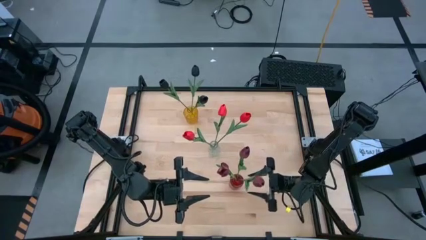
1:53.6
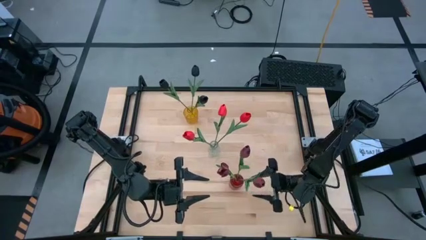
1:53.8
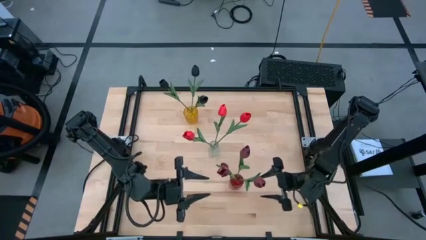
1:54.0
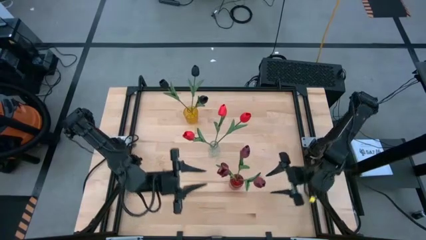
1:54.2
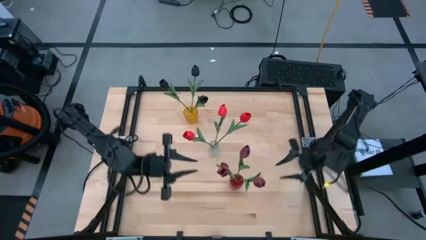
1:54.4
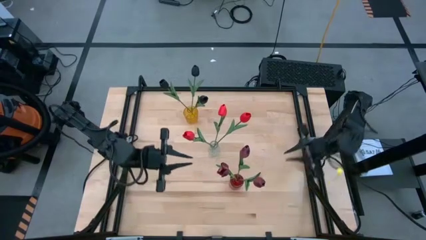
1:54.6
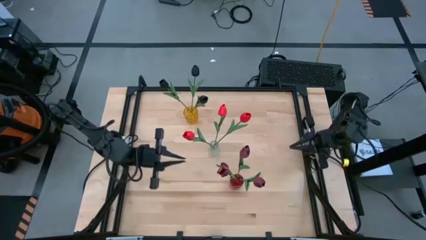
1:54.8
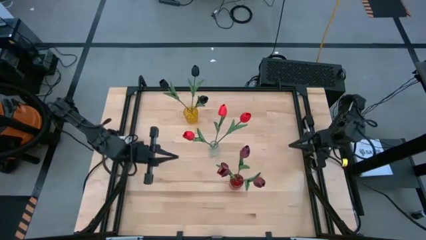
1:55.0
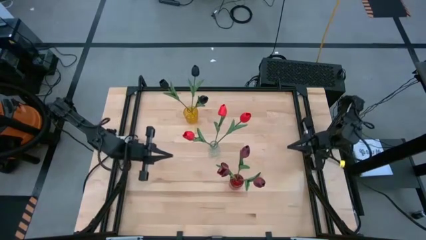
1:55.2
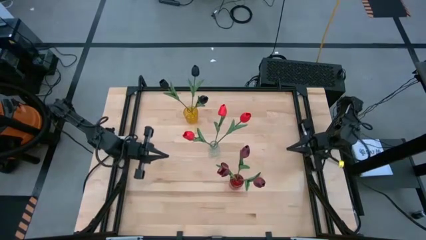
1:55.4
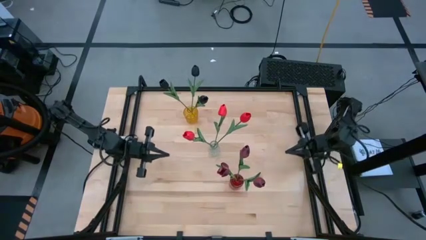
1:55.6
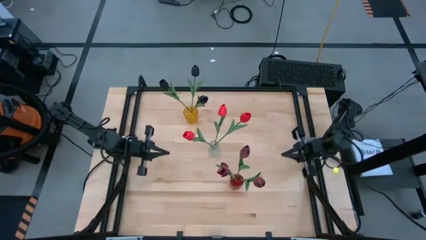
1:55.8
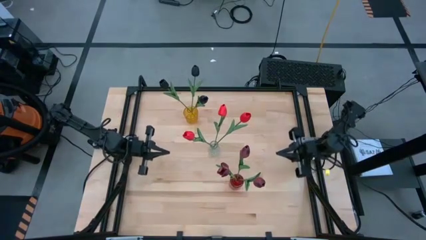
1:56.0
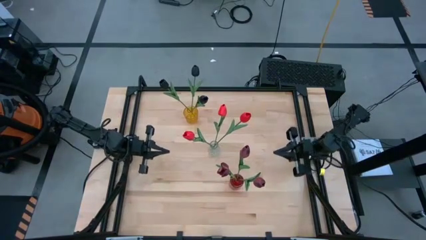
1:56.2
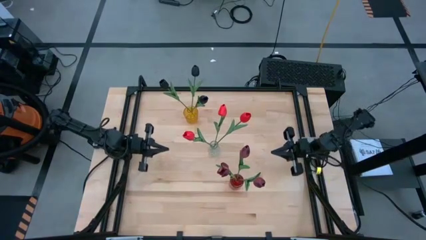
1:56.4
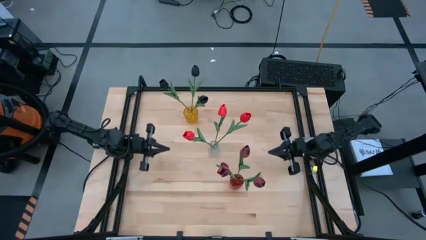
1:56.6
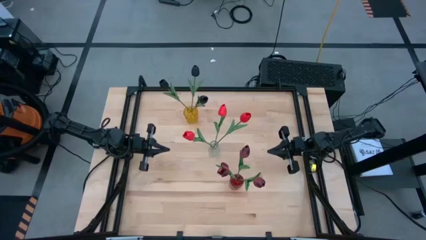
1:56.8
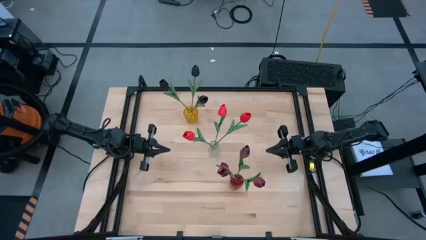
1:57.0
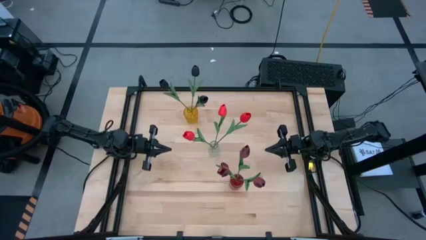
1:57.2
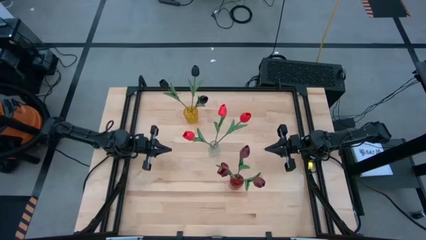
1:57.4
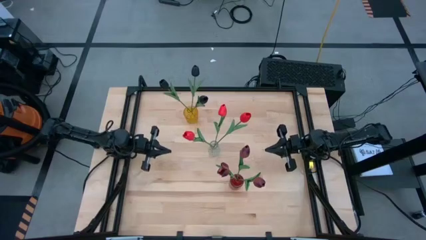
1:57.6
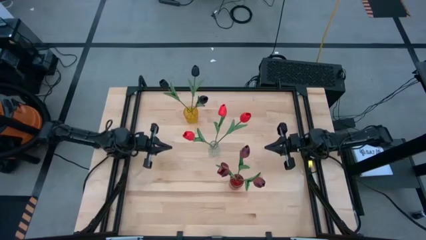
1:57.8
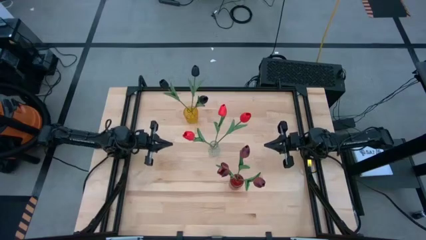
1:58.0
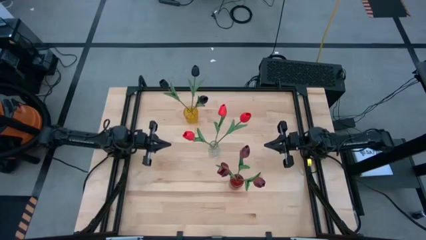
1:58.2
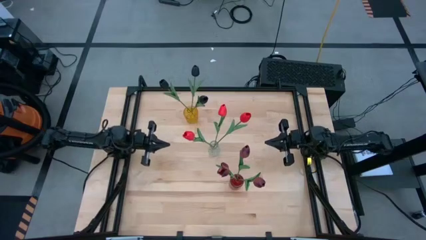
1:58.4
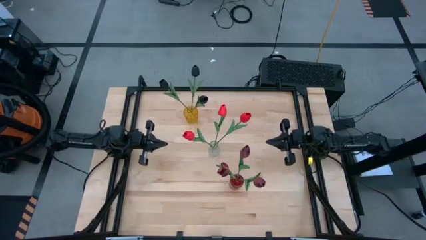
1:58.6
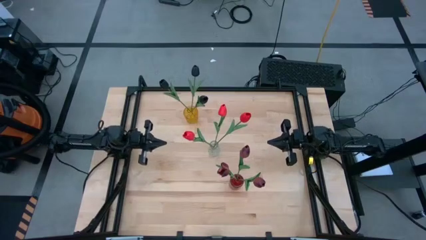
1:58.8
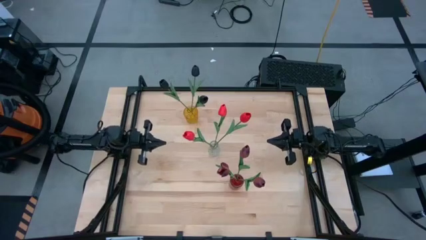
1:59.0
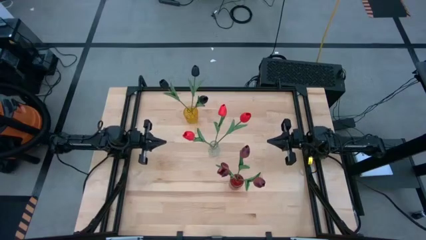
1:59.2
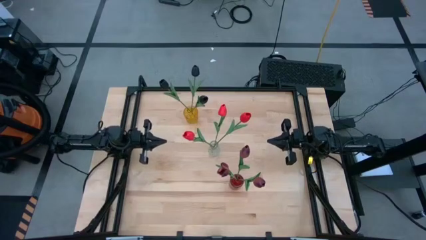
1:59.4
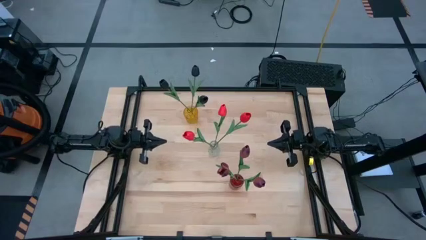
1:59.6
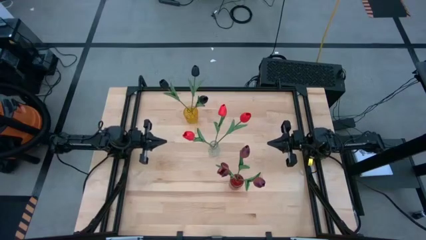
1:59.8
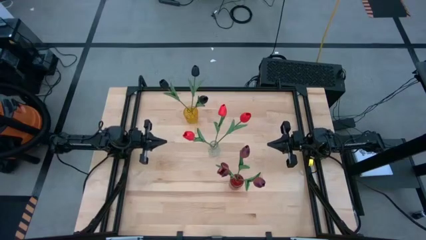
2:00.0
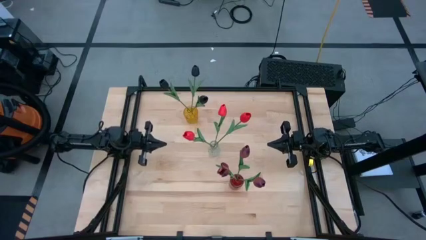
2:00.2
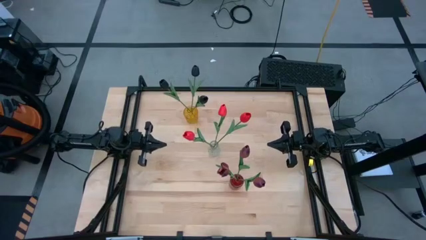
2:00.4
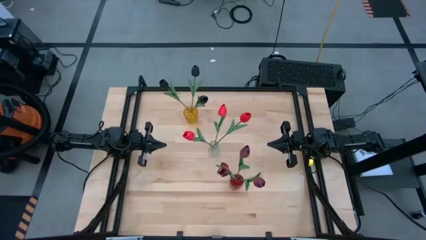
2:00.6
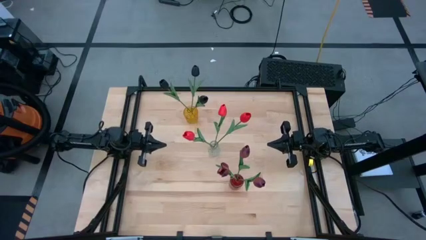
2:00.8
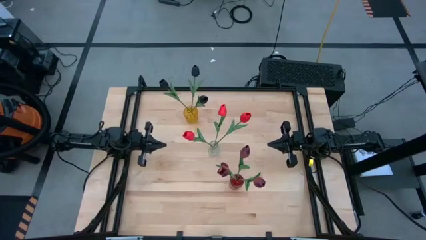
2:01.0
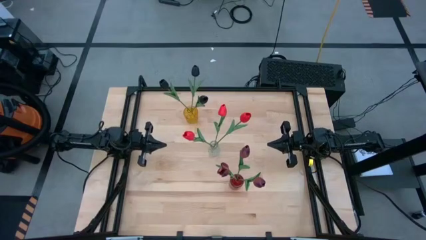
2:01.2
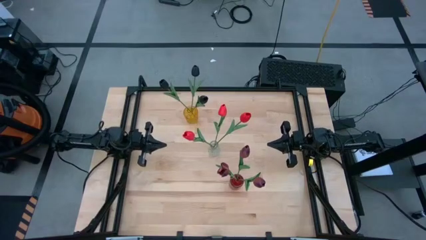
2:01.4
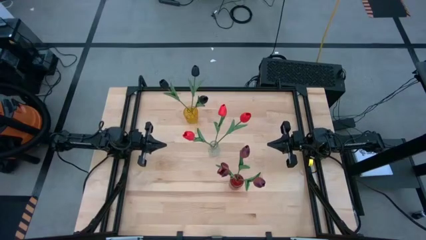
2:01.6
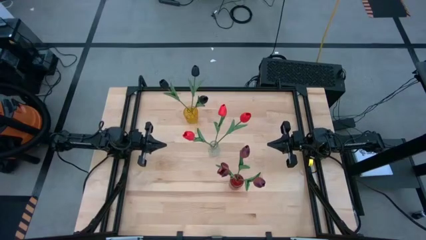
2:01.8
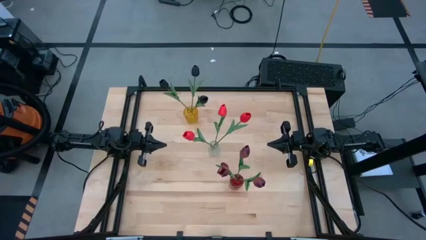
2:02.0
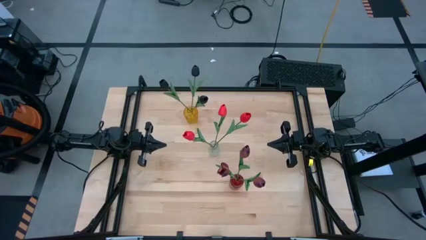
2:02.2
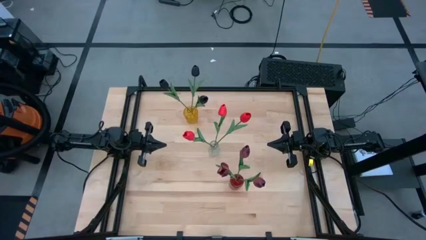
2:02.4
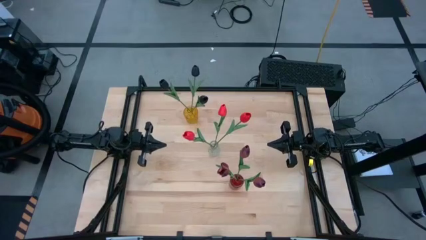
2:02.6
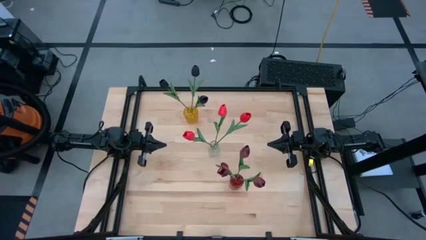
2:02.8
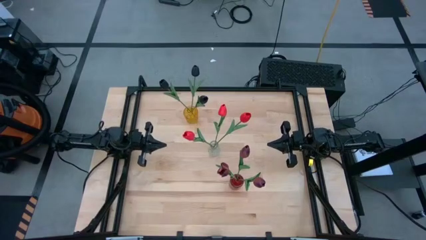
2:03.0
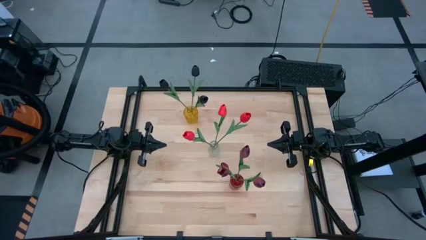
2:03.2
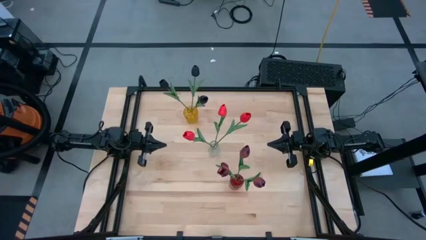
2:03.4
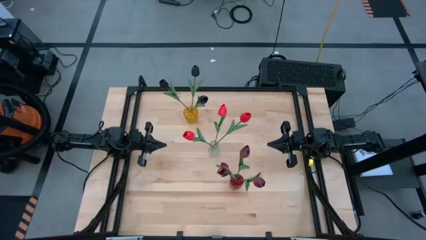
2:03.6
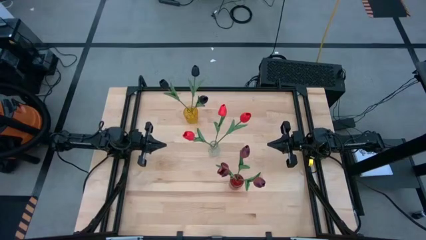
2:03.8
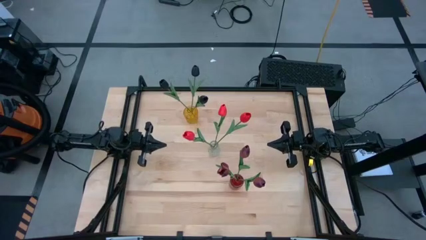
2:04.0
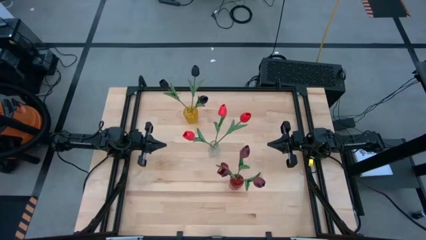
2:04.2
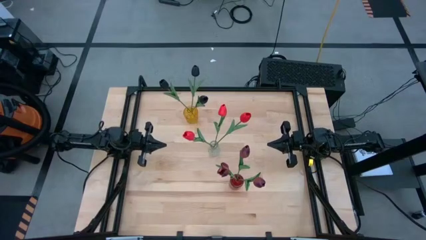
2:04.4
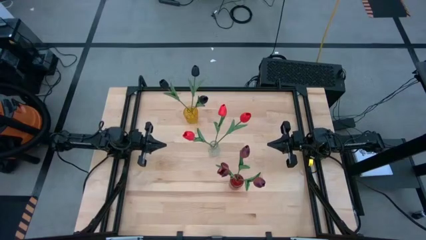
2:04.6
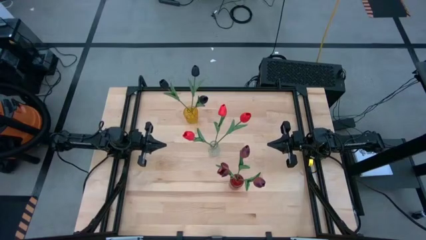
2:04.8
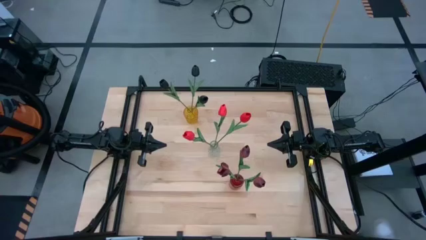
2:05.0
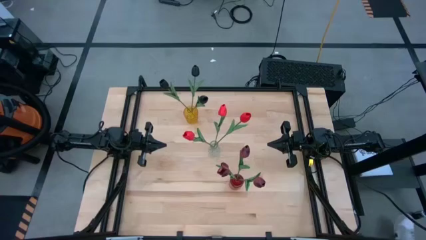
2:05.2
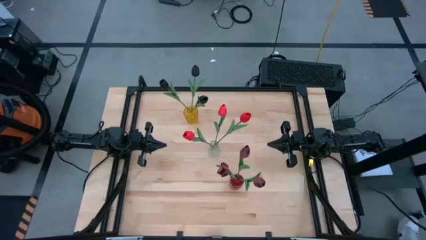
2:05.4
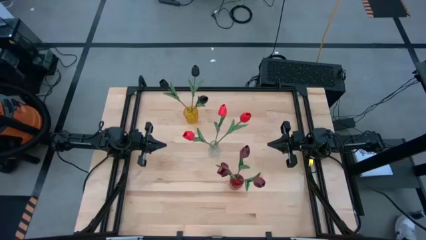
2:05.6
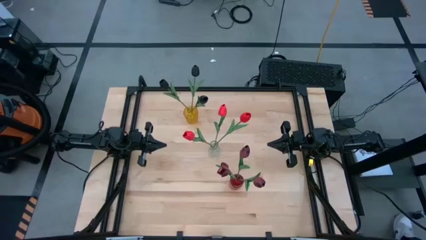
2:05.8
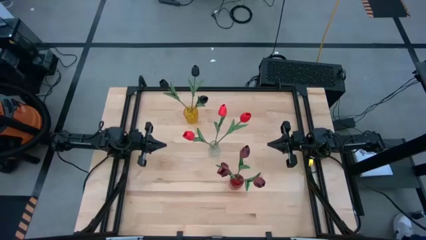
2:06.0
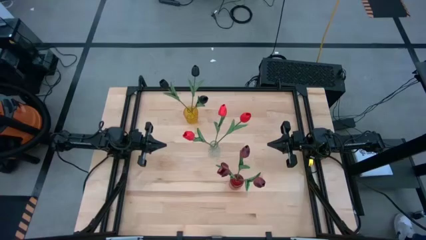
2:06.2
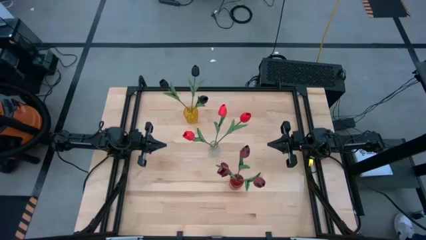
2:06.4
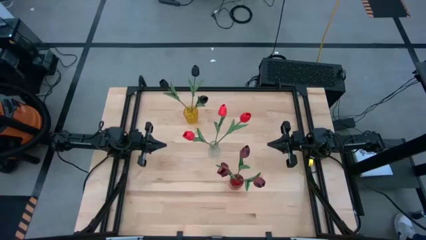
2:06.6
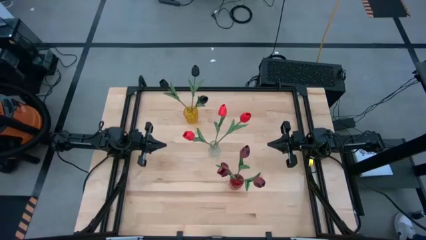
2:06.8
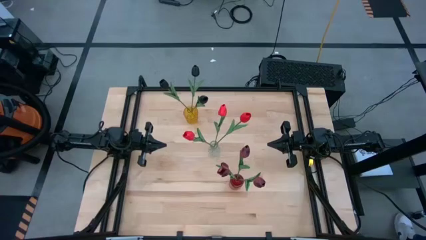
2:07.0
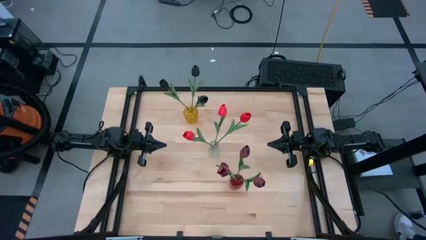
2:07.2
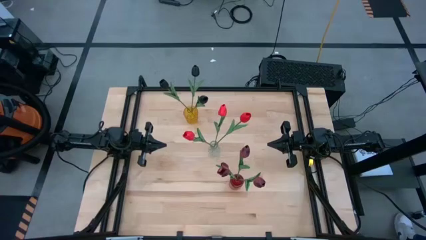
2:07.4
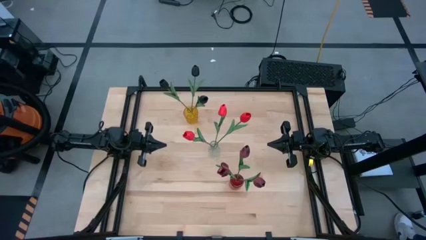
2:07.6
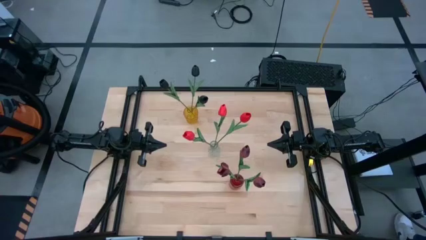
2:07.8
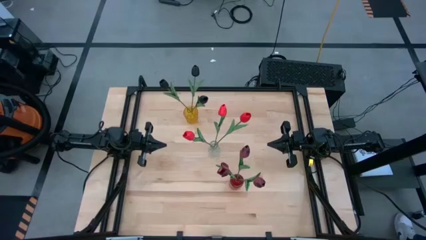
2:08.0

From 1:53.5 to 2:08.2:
Task: Sort flowers into vase by color
Return to Home Position

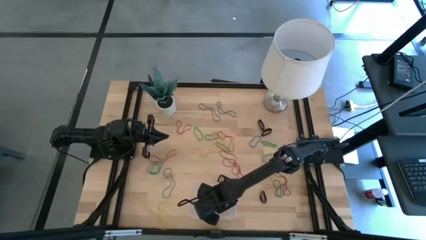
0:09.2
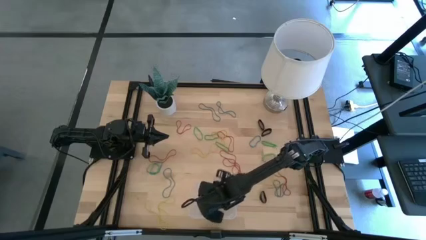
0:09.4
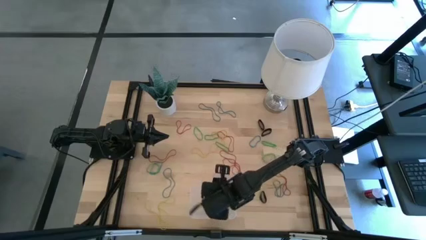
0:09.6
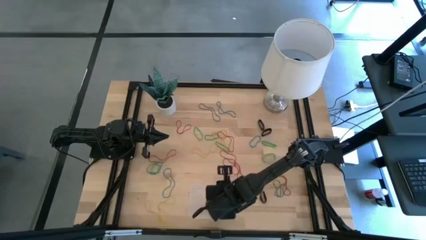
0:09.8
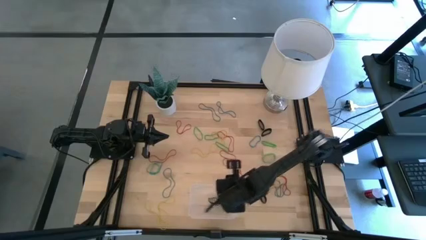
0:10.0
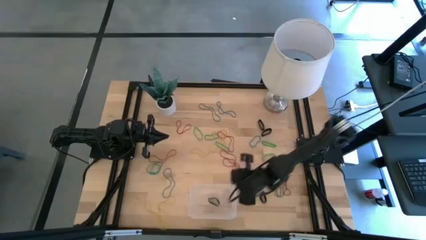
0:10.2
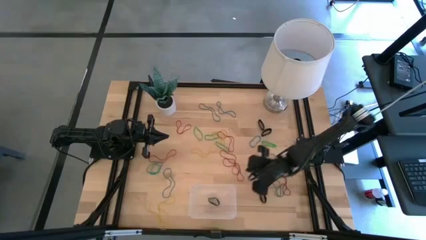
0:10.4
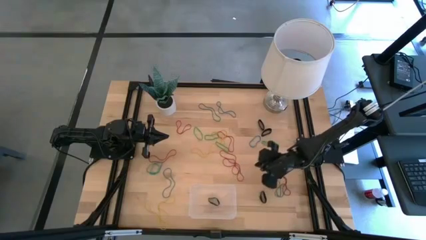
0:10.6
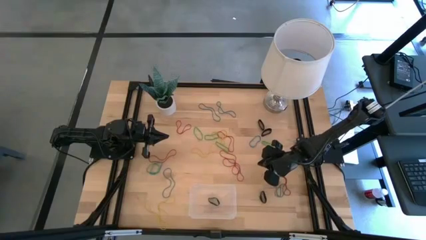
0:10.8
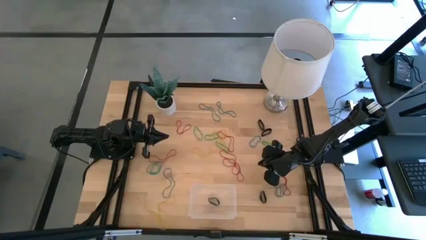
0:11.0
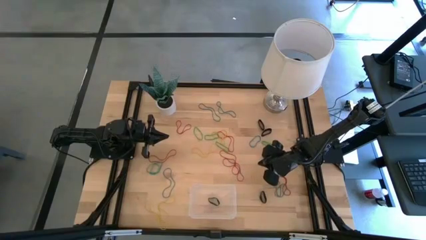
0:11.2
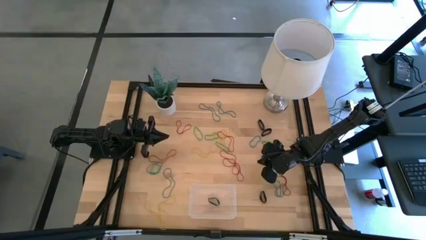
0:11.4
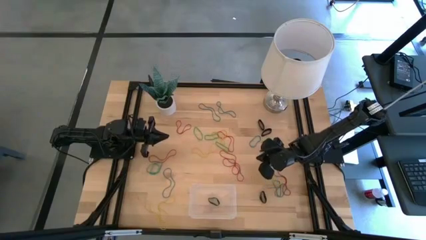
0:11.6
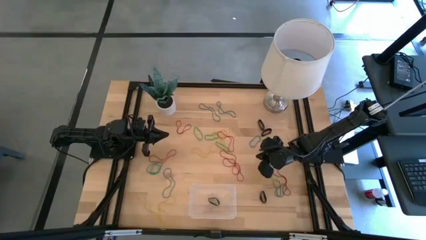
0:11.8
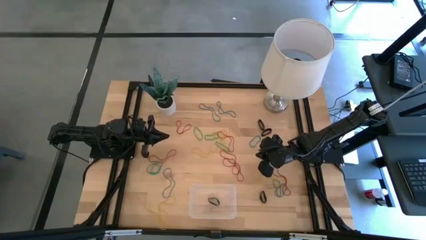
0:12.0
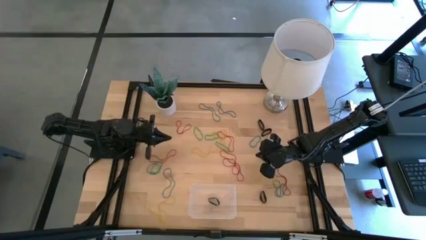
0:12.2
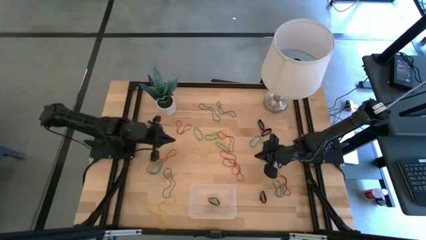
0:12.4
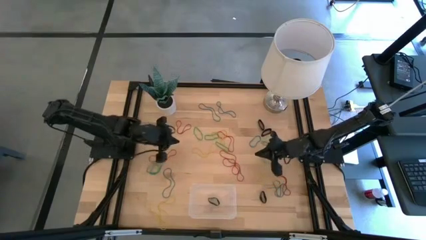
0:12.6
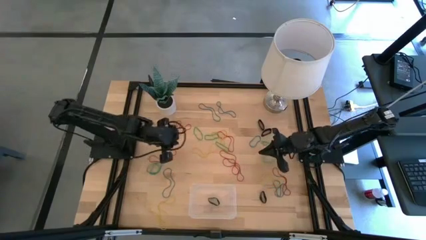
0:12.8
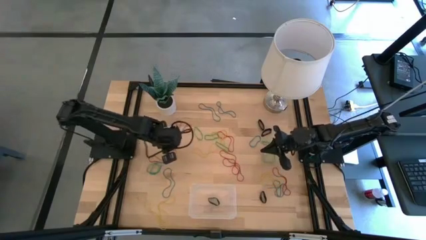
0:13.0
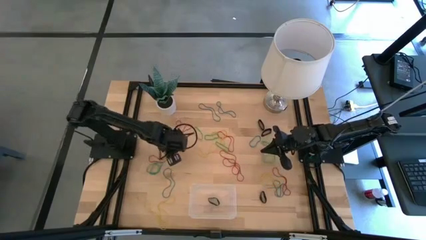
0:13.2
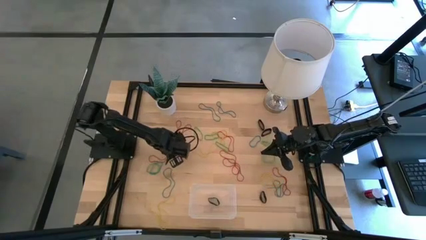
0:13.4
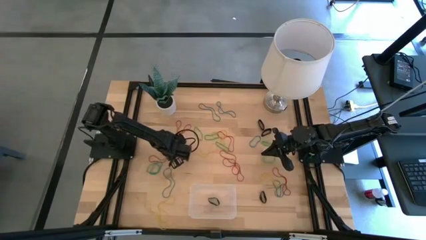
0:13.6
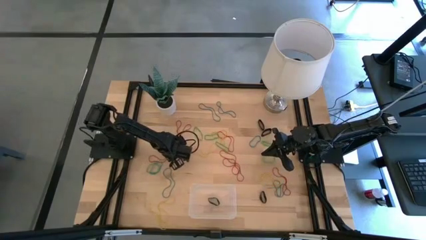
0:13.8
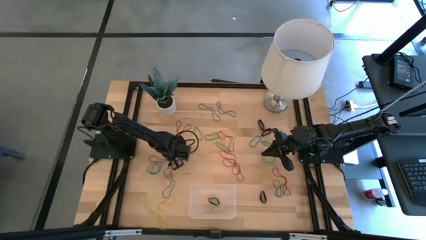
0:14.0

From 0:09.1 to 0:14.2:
Task: Pick and place rubber bands into bin
Put the red rubber band into the transparent bin
